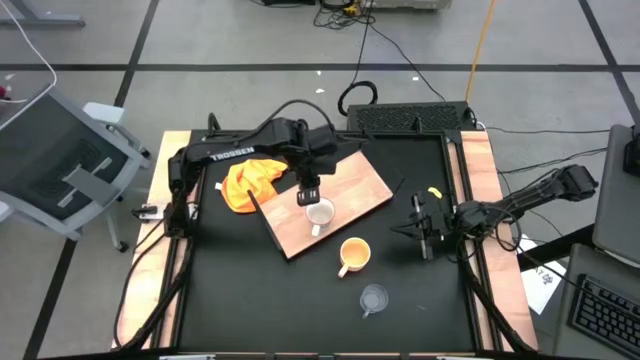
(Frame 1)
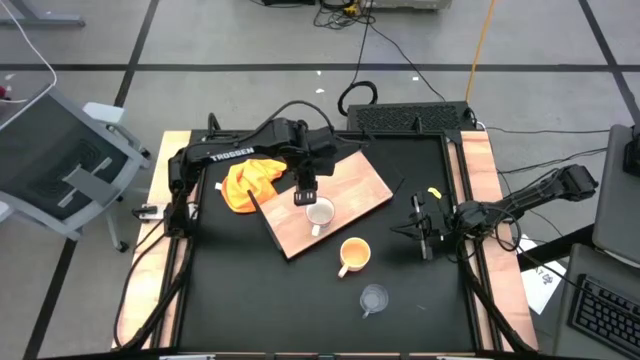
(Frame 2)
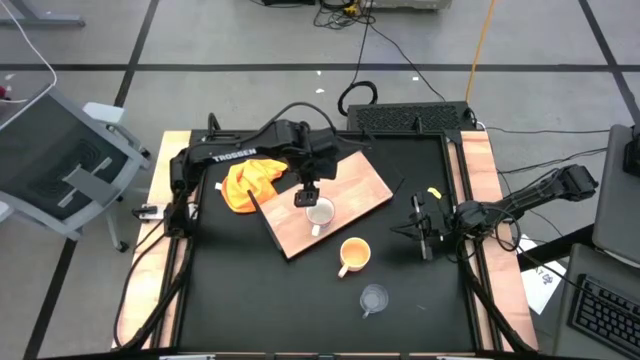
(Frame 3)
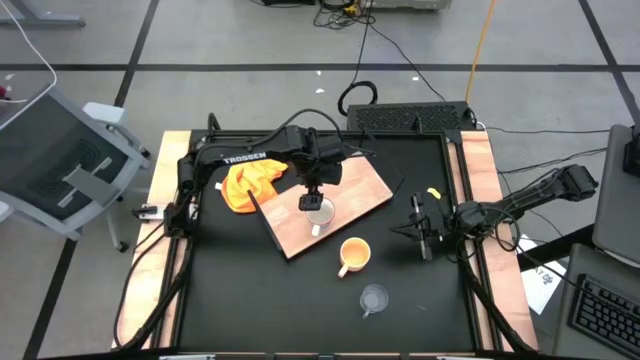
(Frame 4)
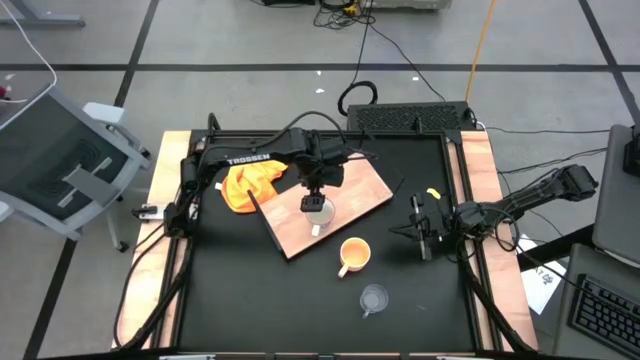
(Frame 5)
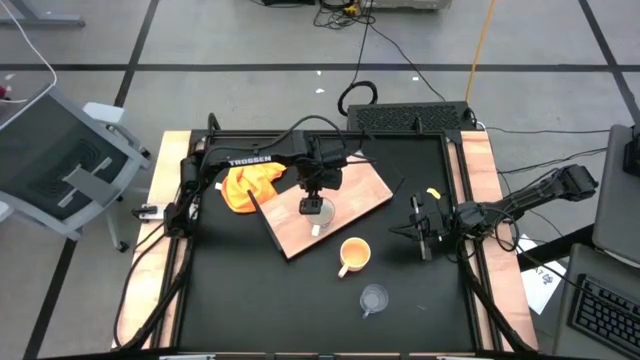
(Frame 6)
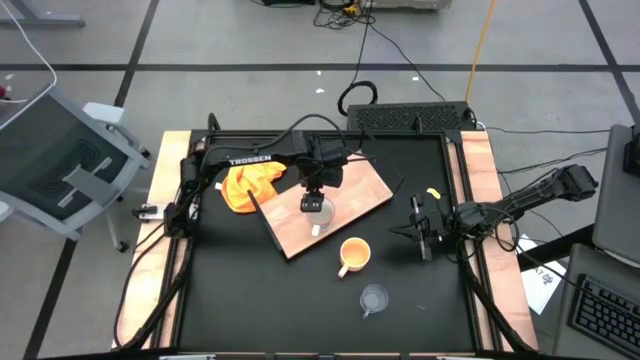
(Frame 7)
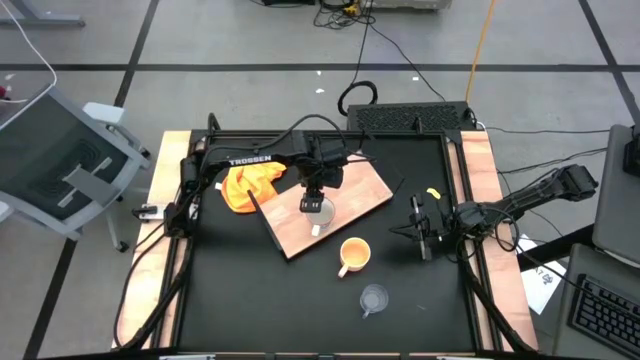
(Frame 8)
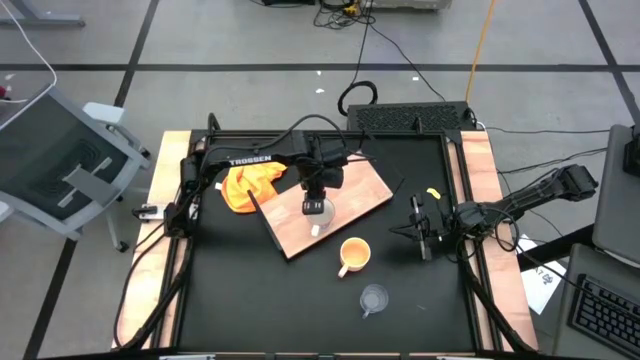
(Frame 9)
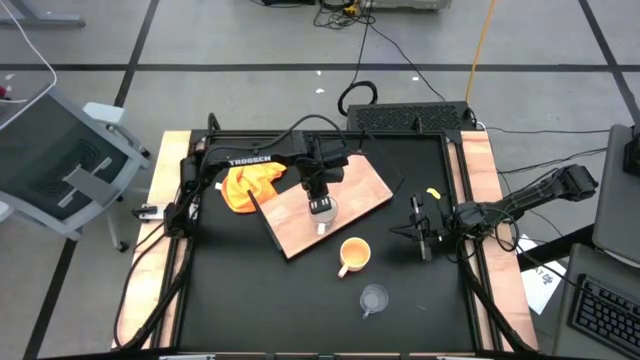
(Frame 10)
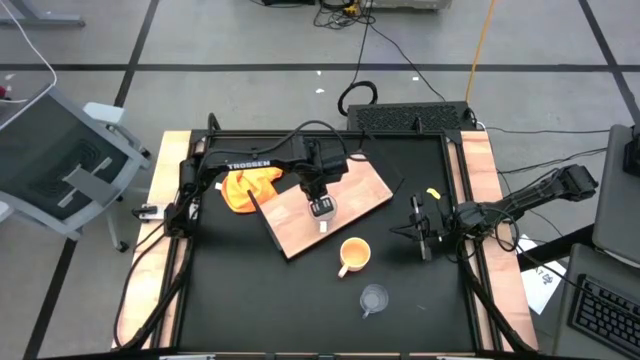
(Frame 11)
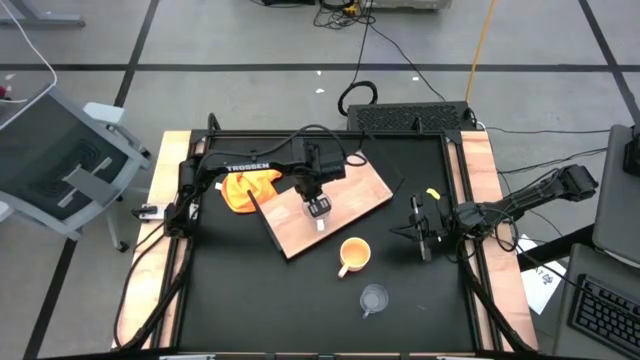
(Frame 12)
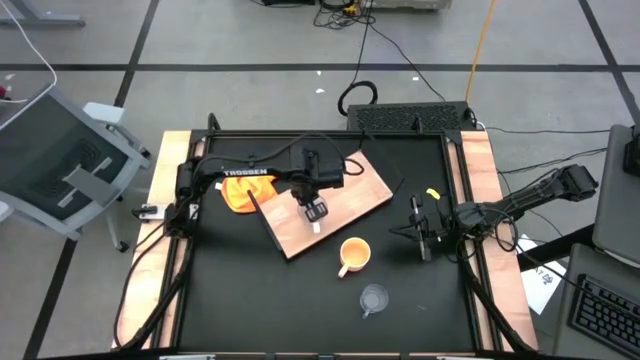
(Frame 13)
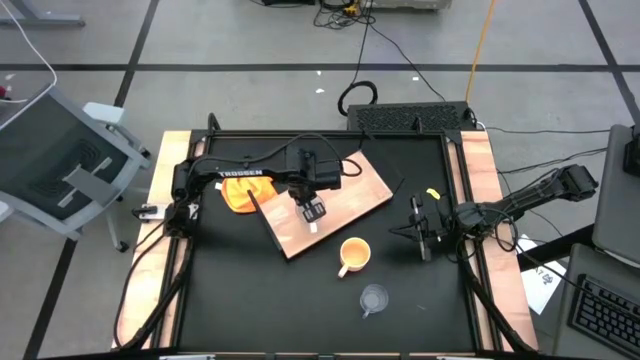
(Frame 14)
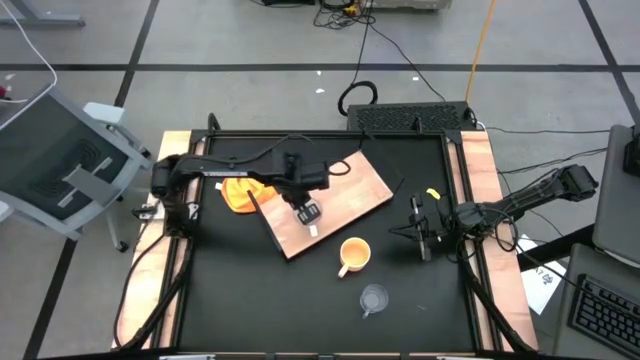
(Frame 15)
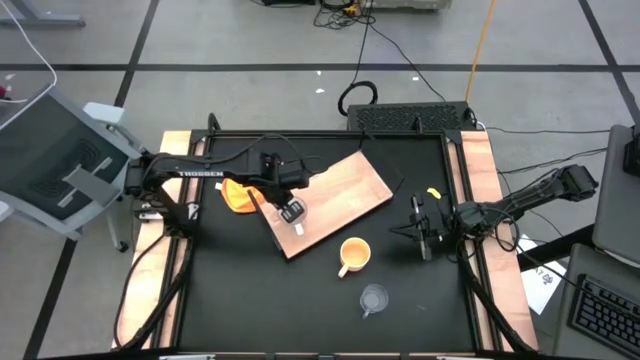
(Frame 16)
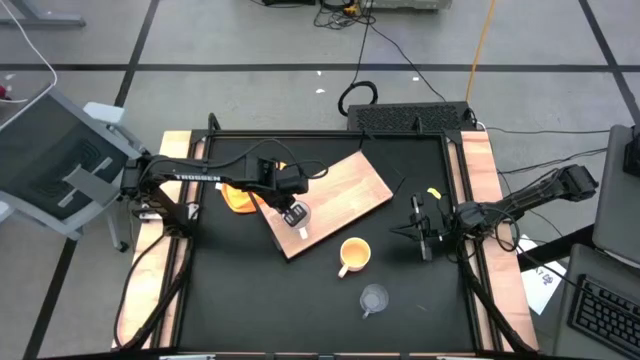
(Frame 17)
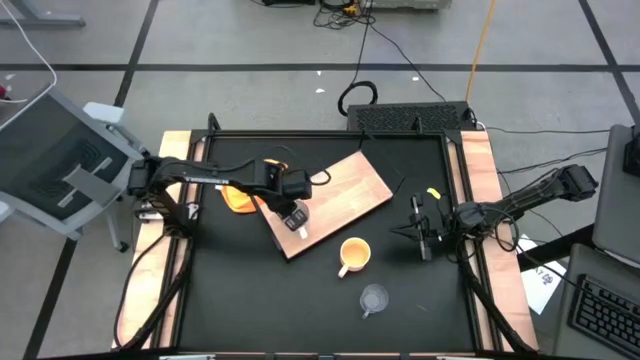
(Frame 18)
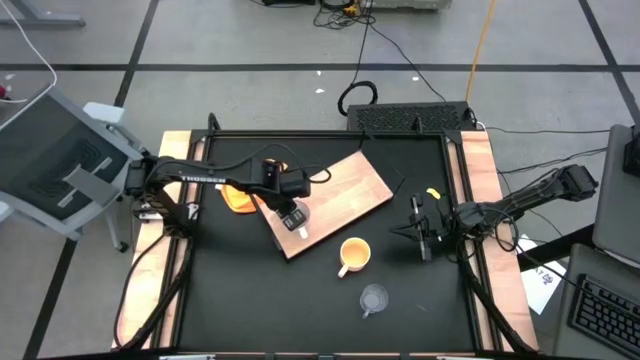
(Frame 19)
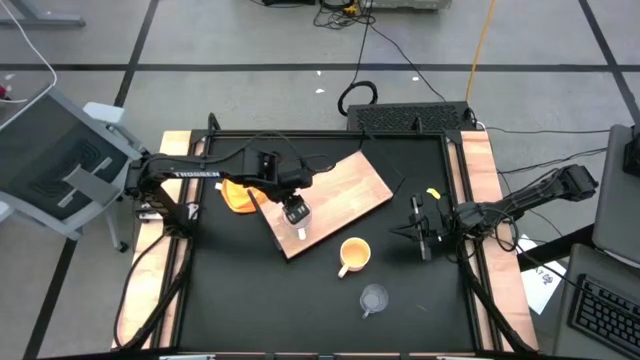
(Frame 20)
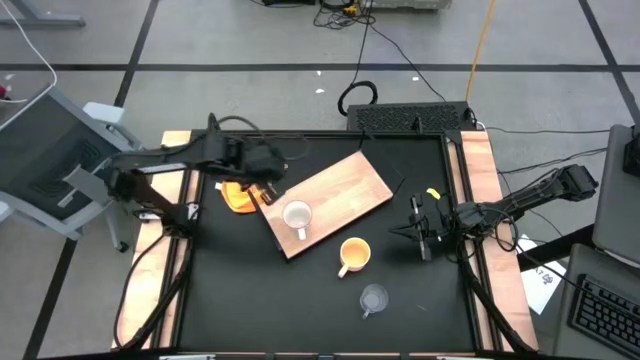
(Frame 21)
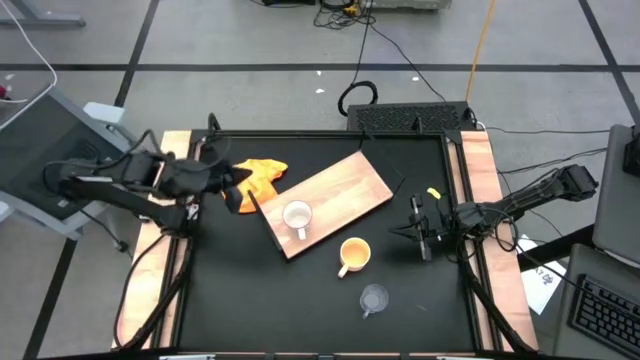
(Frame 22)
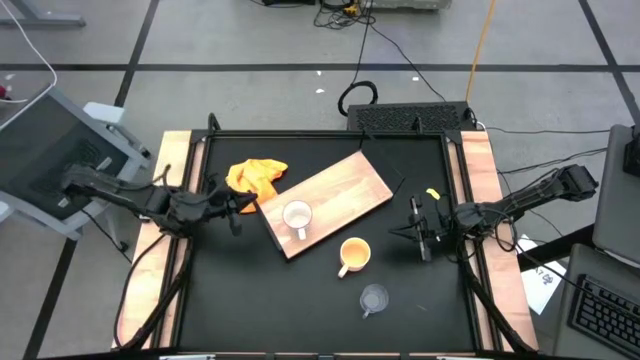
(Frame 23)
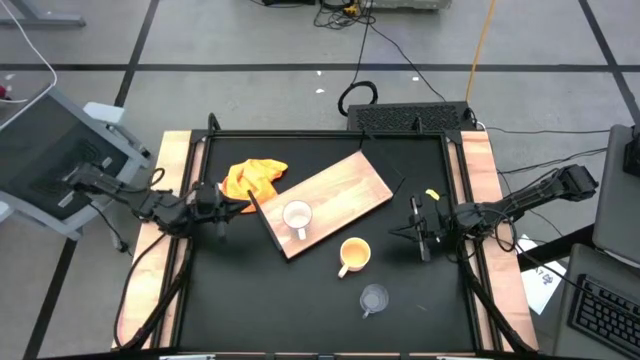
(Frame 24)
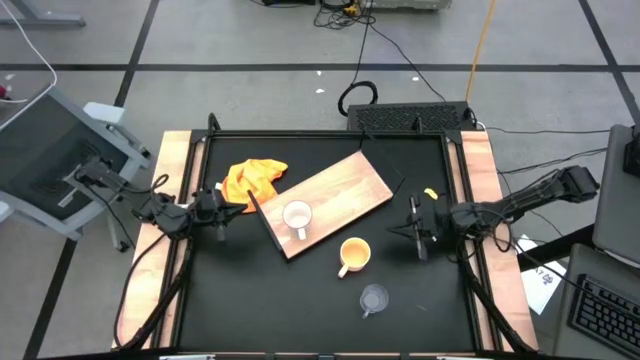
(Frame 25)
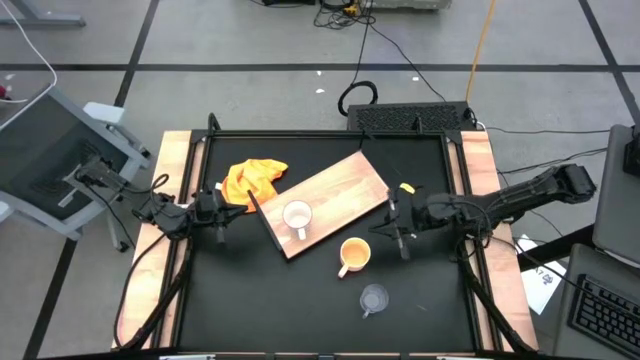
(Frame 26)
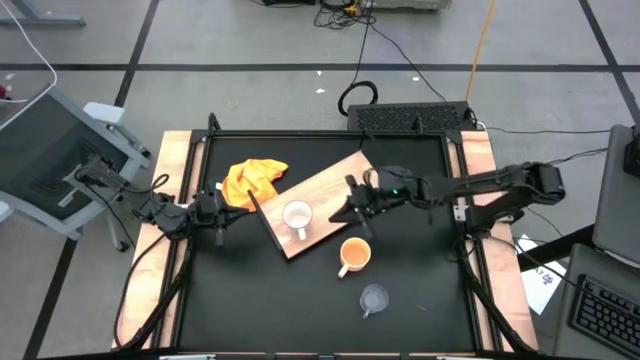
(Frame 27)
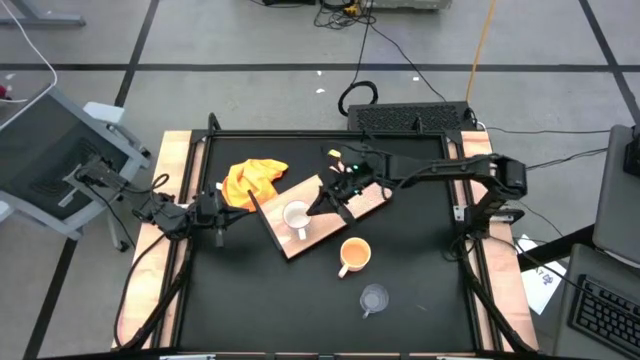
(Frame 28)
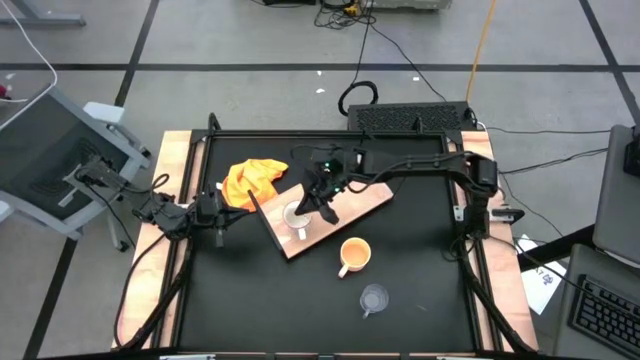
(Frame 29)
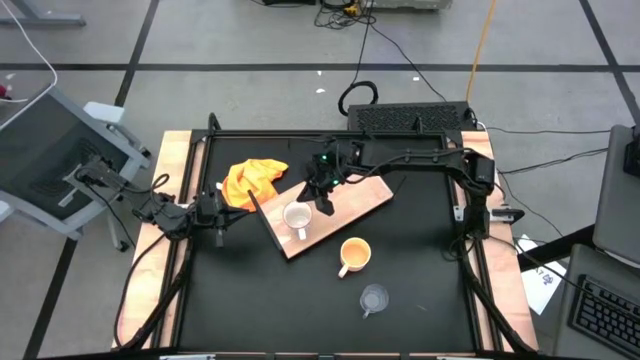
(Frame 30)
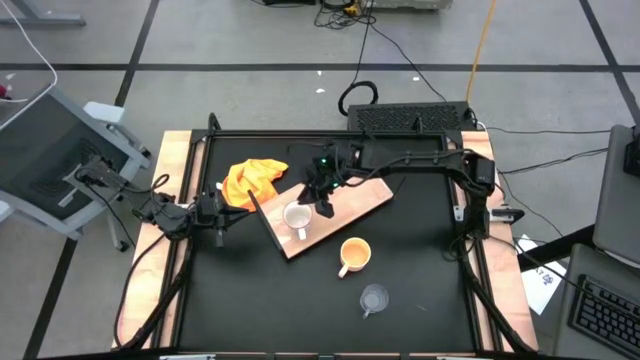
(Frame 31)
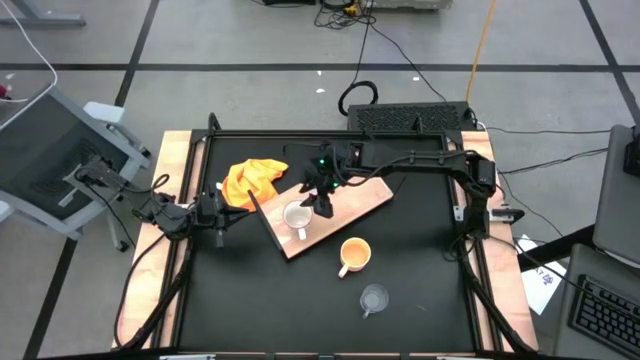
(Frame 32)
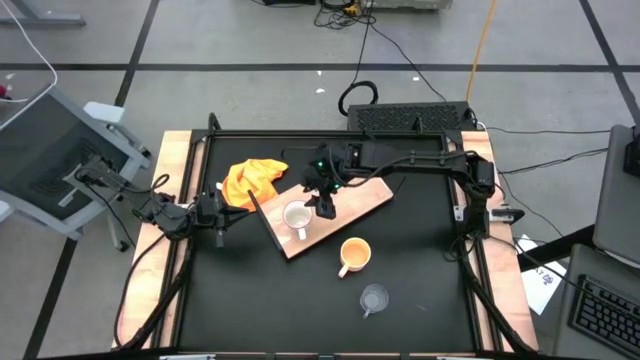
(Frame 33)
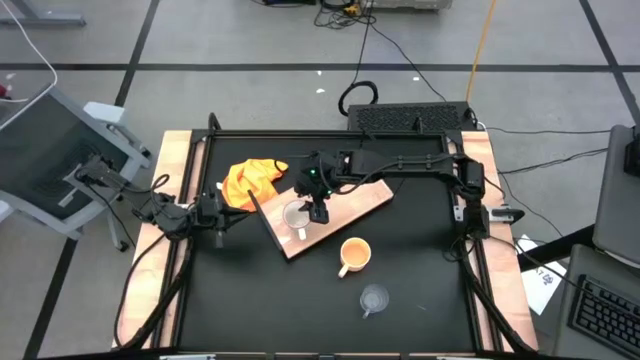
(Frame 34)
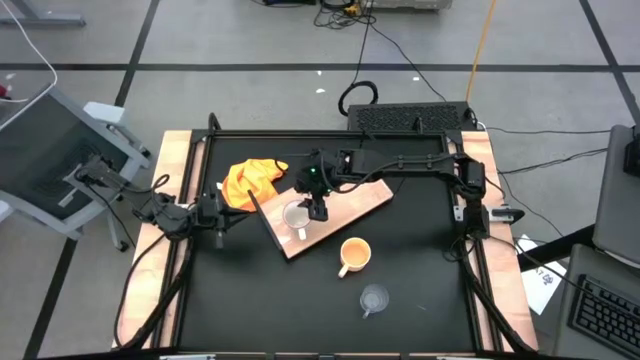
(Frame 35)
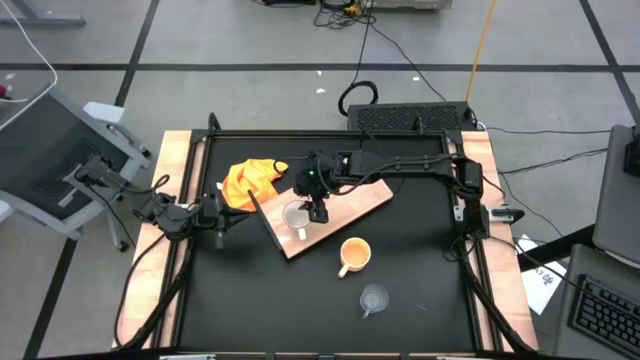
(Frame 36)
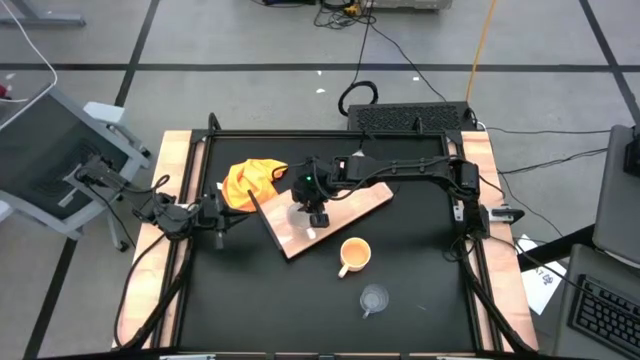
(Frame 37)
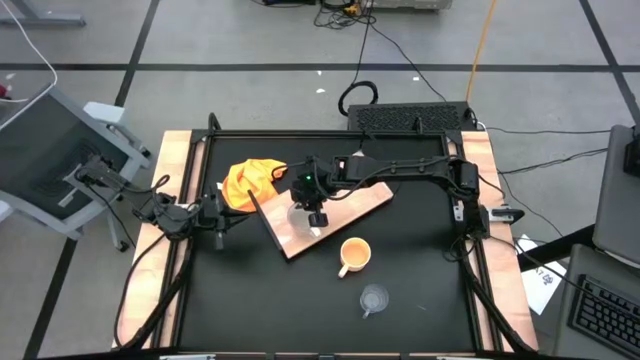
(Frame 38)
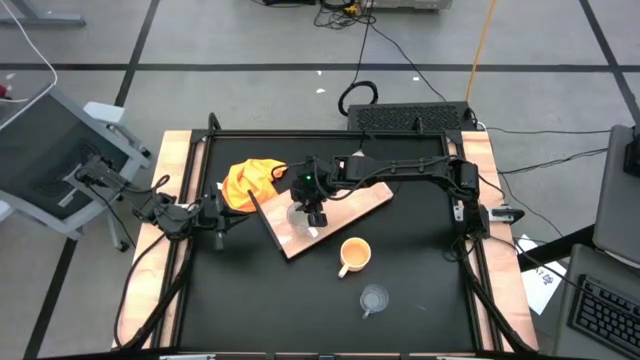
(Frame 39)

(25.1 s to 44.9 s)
Task: Stack small to large cups/mugs on shelf
Put the white mug on the shelf
